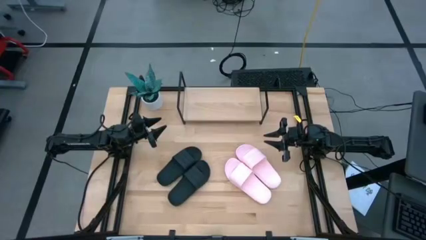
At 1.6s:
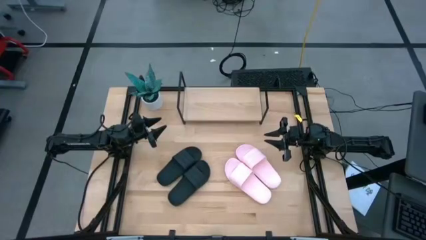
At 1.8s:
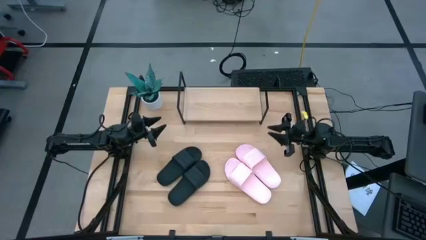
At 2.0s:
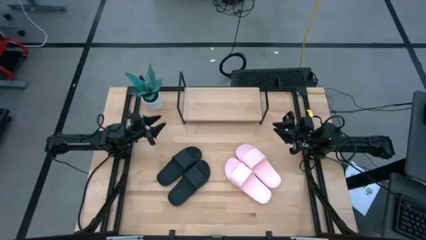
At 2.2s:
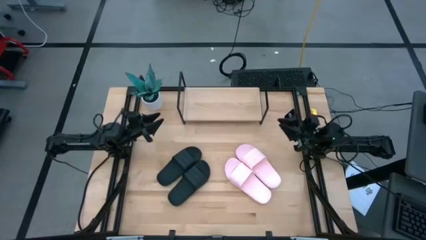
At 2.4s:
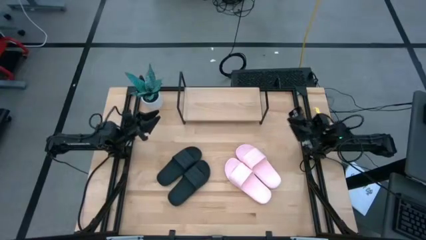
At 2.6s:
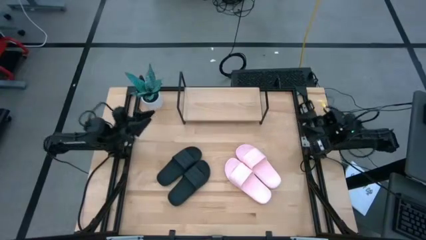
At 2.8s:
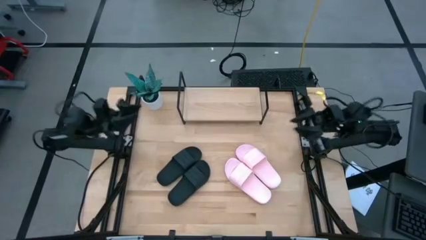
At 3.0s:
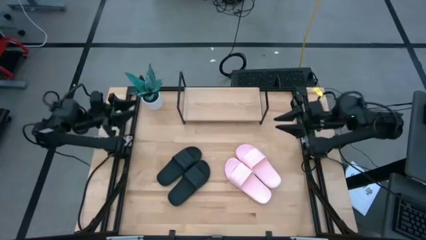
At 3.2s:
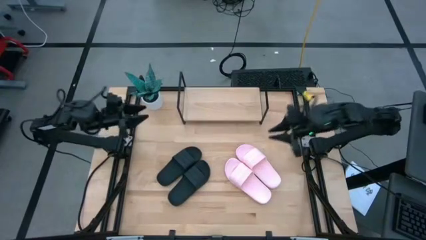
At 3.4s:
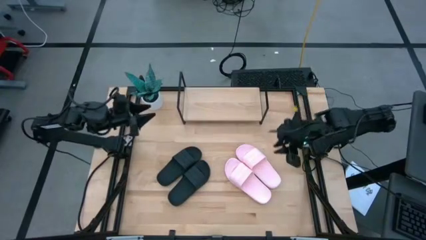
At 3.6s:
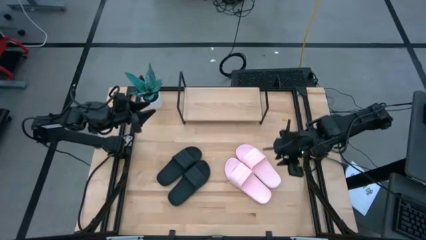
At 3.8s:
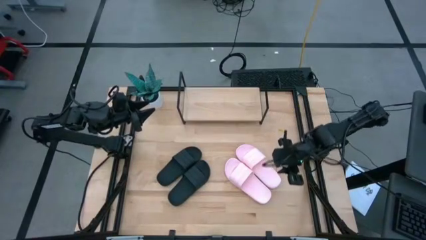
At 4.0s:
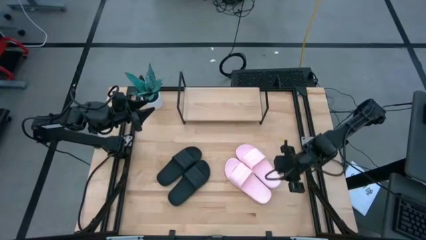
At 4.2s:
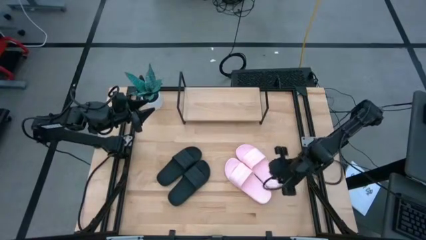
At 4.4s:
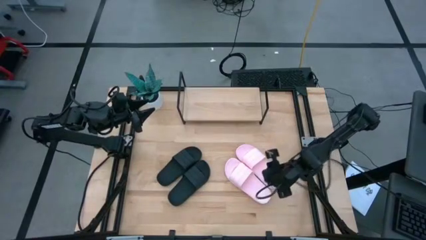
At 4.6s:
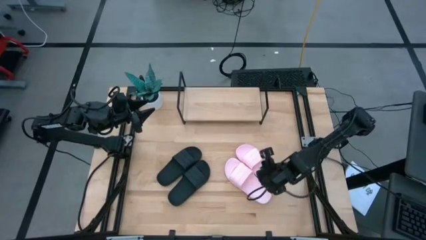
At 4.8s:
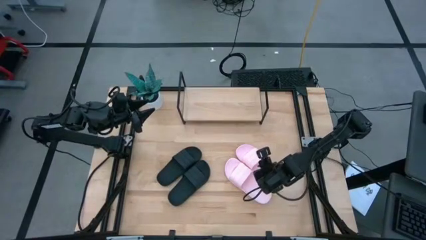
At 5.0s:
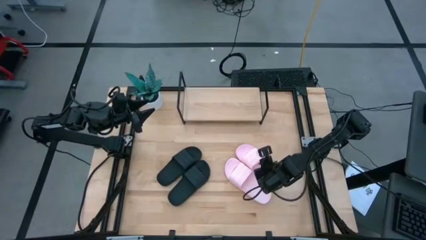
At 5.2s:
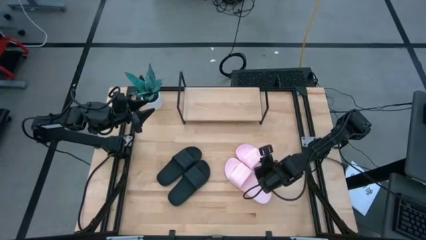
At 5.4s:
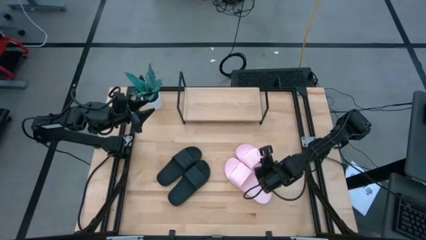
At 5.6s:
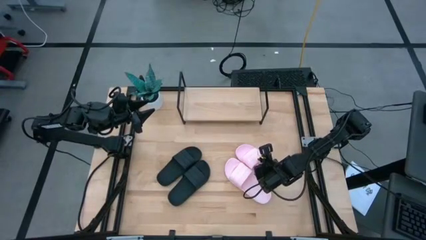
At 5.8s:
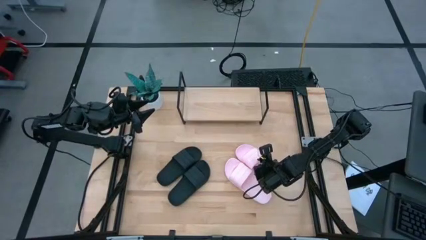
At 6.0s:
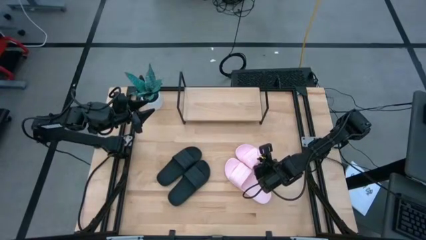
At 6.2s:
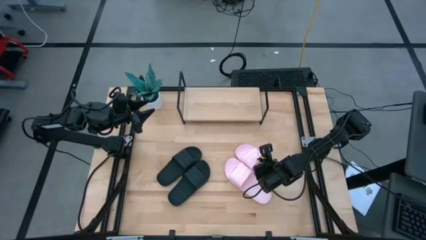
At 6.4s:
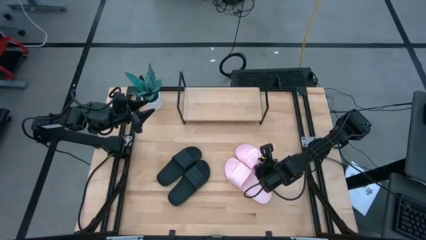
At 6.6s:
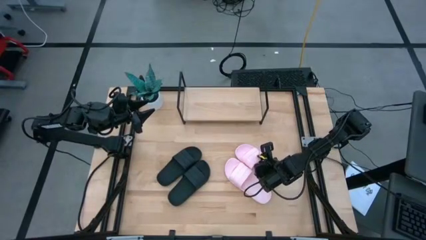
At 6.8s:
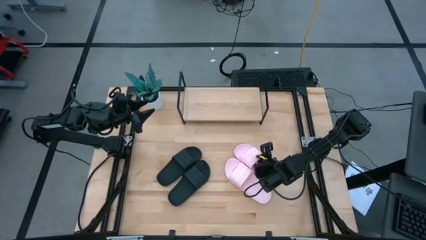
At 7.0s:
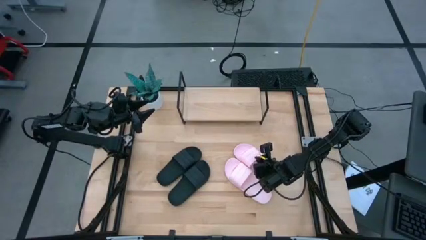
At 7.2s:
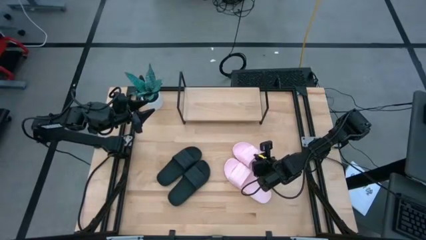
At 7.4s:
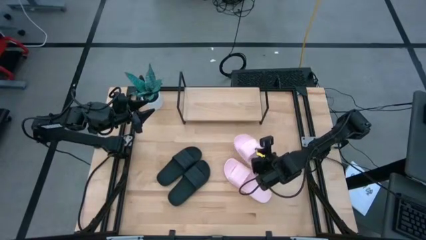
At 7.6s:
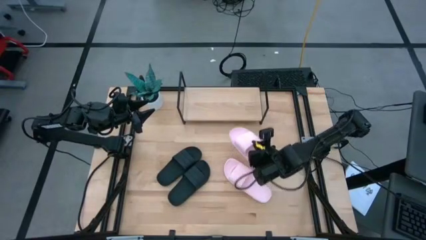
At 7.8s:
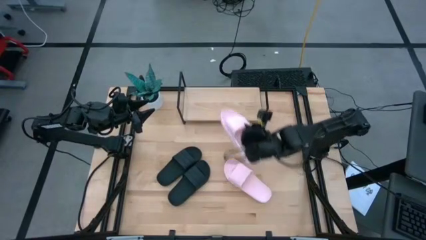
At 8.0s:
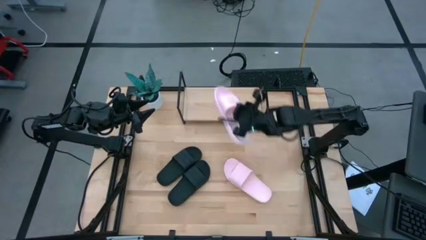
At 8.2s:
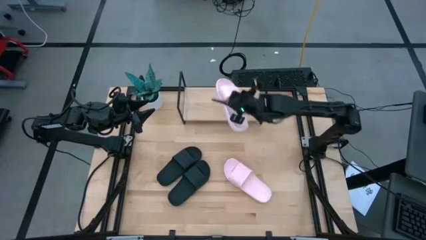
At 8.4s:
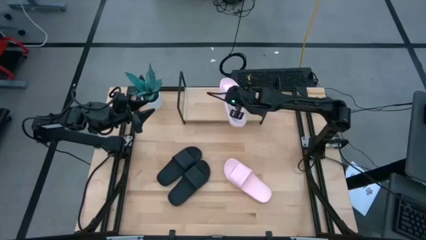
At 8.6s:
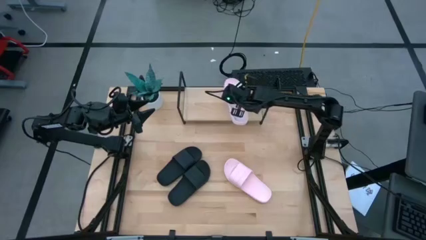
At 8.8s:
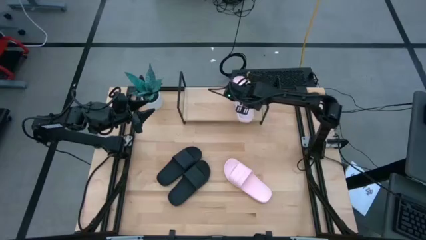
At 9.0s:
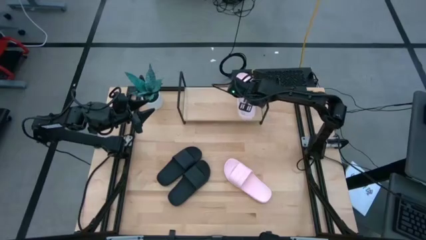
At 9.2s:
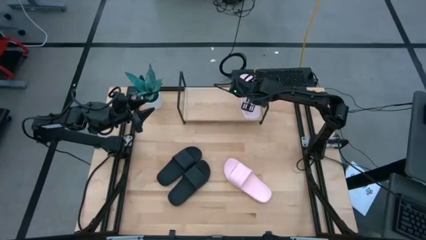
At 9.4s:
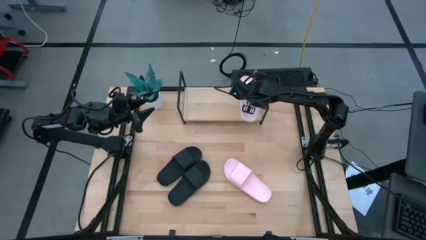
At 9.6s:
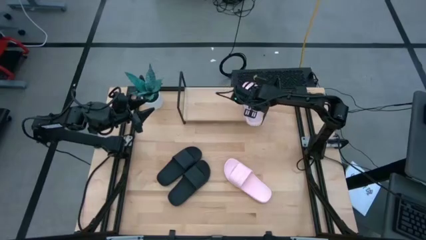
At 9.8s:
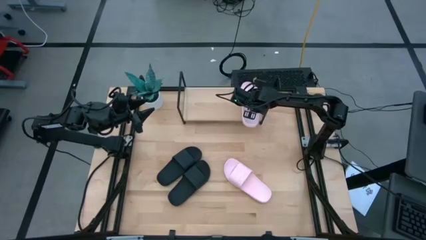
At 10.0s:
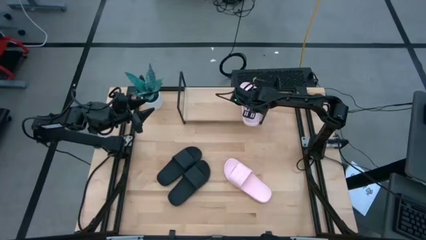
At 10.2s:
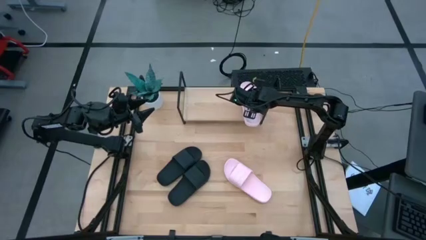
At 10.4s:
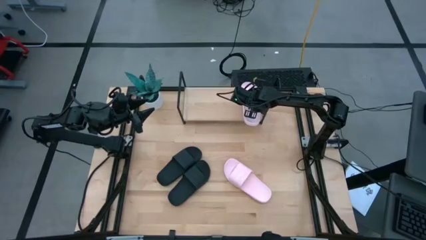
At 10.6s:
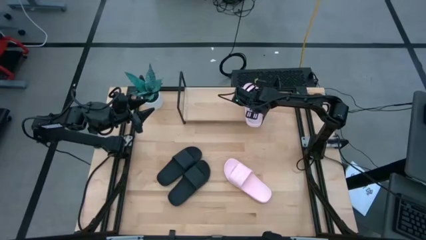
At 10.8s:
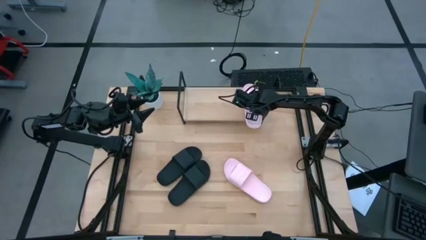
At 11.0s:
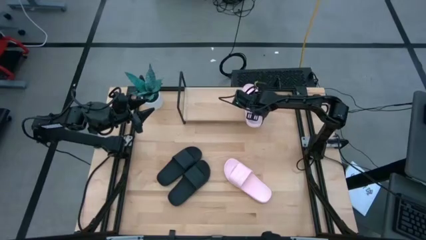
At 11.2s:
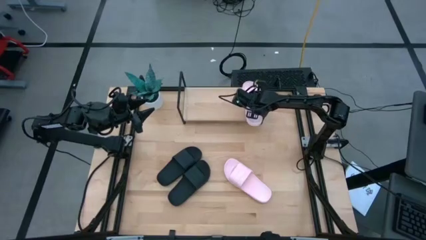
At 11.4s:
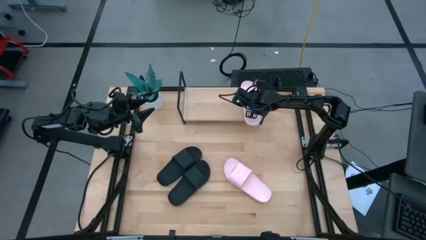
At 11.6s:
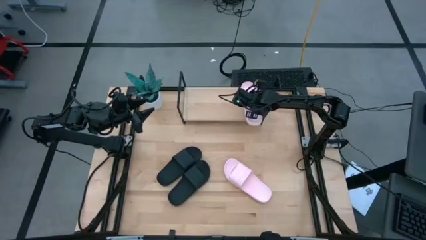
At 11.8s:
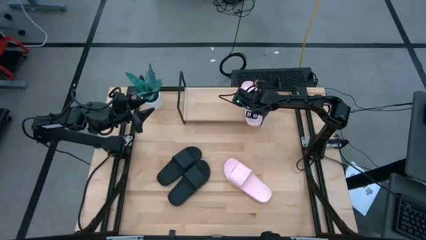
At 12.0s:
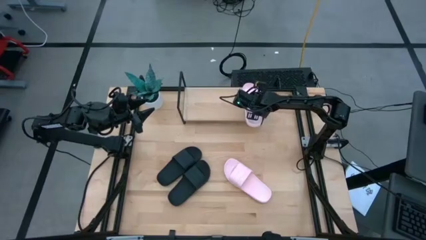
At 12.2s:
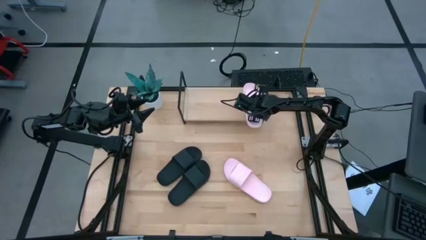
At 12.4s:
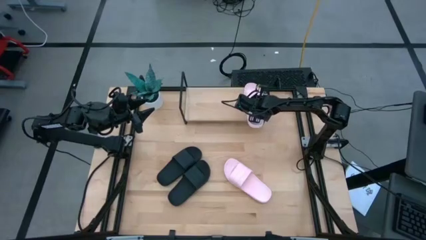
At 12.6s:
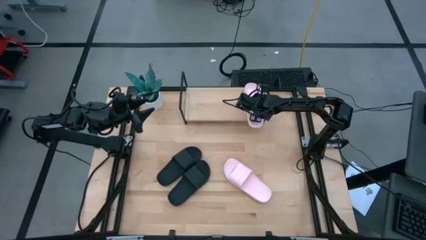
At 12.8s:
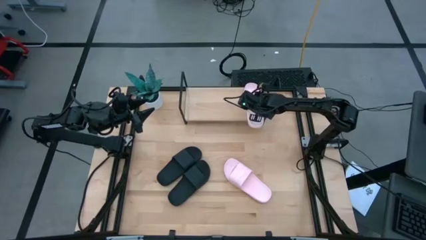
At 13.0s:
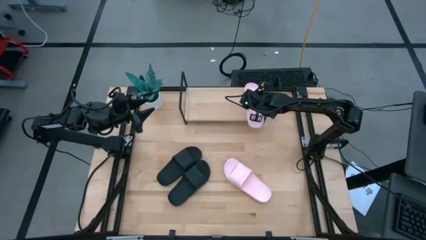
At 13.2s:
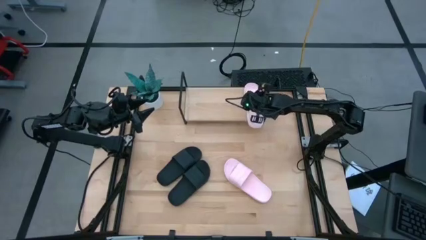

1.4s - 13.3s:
Task: Pick and place slides into the shelf
Put the right pink slipper on the shelf
